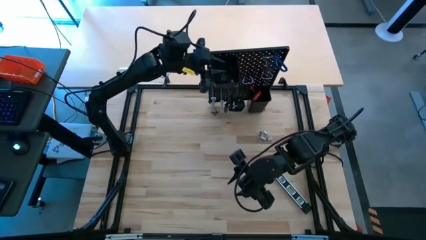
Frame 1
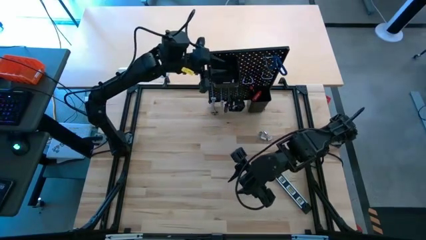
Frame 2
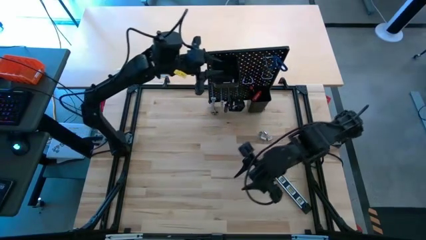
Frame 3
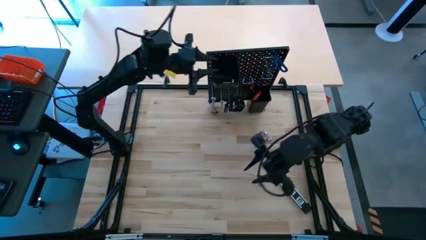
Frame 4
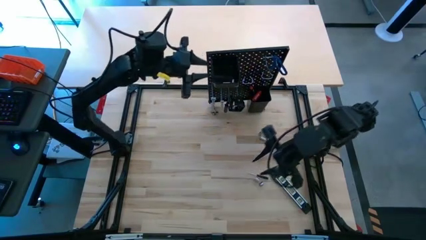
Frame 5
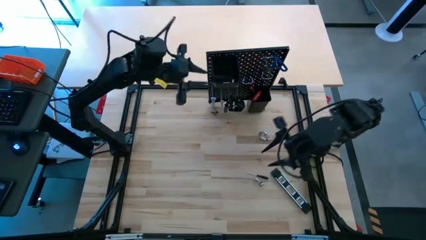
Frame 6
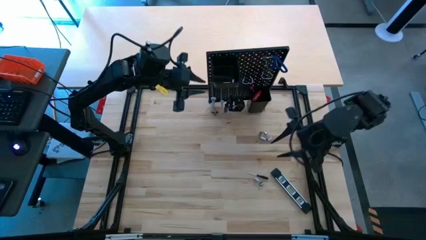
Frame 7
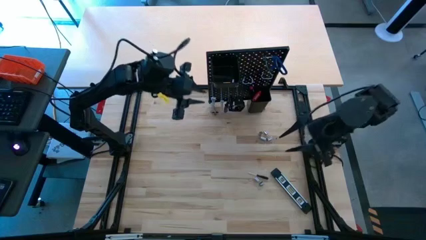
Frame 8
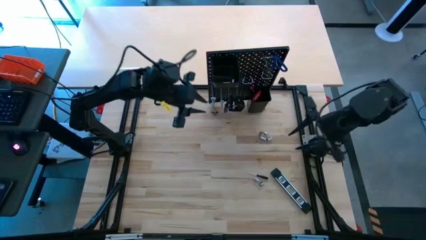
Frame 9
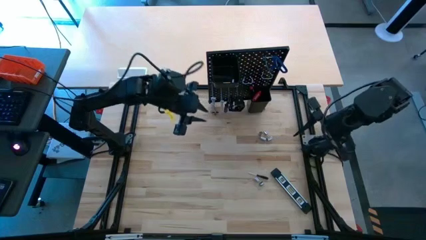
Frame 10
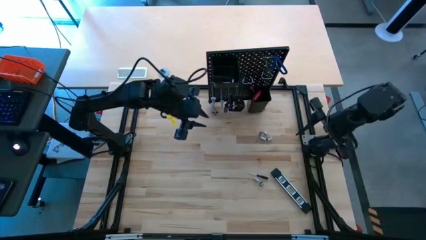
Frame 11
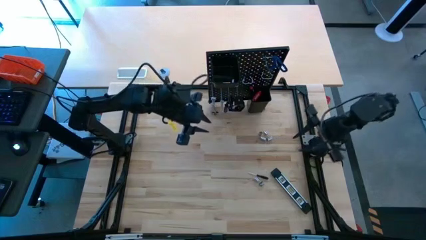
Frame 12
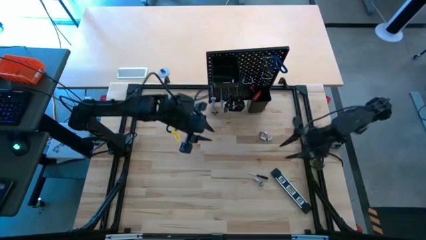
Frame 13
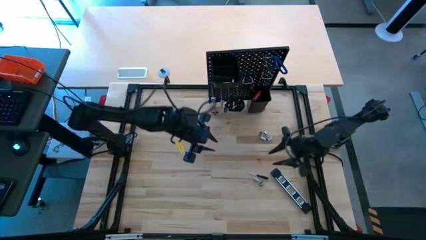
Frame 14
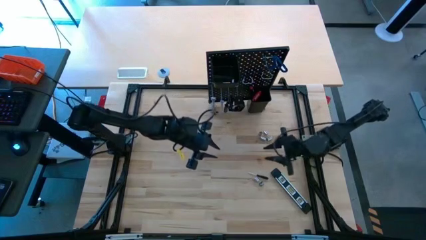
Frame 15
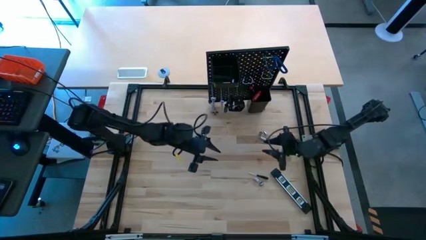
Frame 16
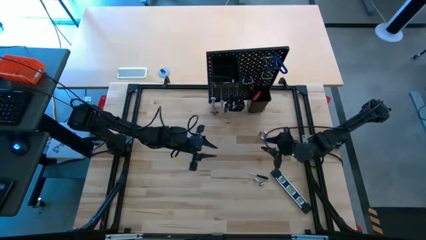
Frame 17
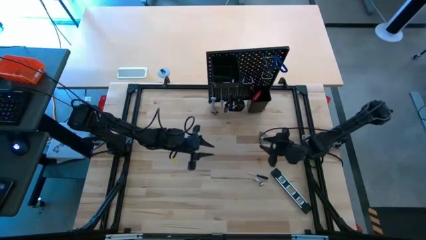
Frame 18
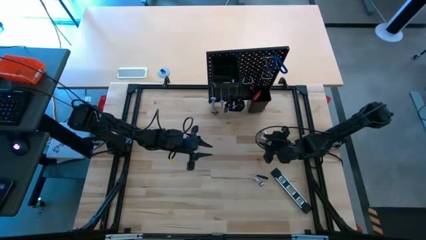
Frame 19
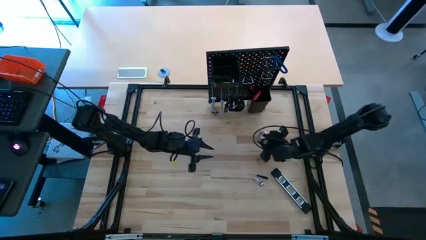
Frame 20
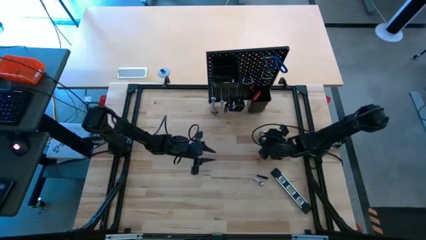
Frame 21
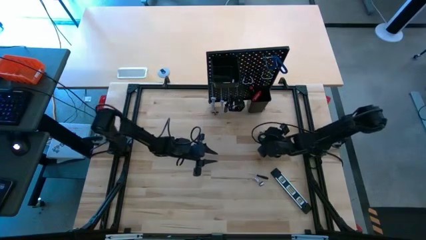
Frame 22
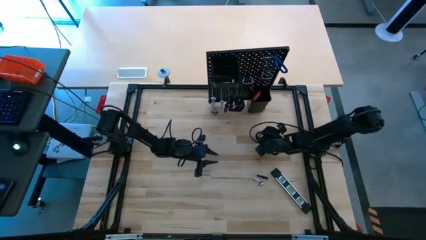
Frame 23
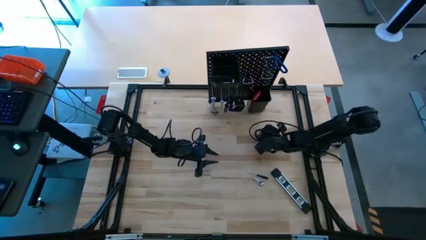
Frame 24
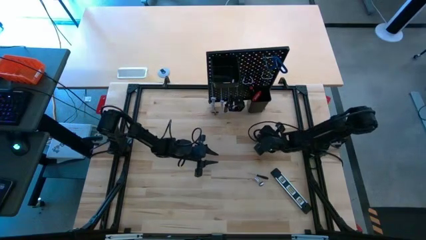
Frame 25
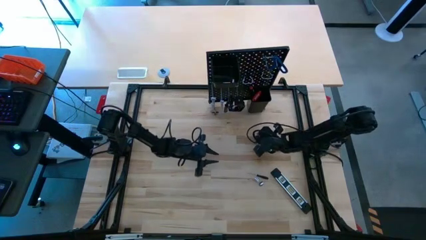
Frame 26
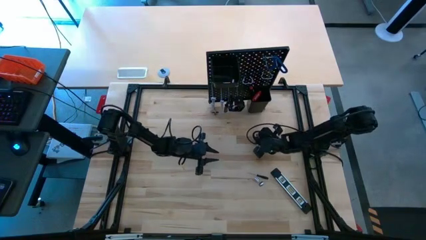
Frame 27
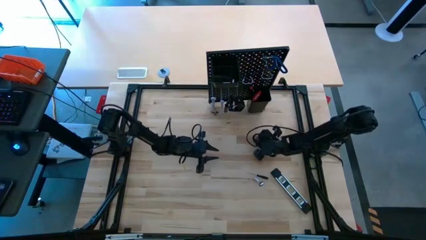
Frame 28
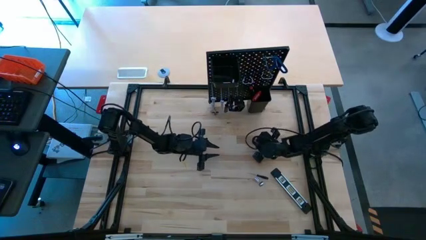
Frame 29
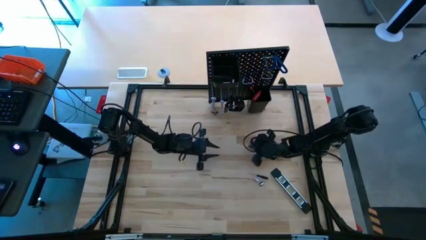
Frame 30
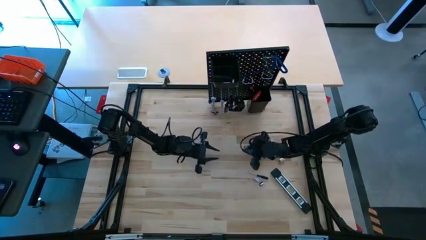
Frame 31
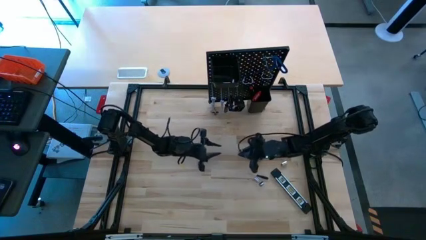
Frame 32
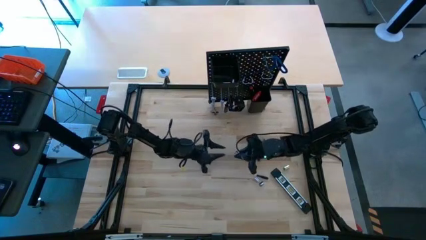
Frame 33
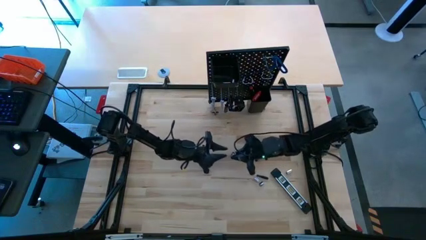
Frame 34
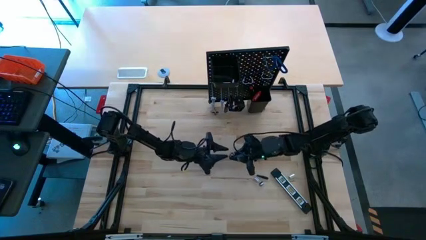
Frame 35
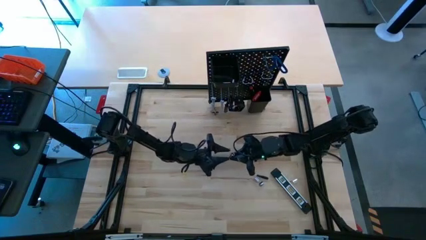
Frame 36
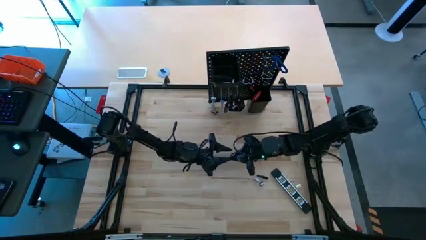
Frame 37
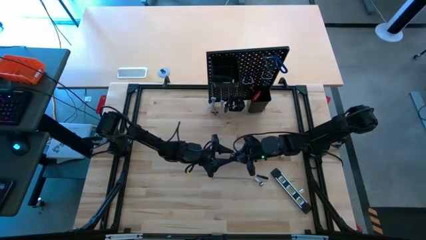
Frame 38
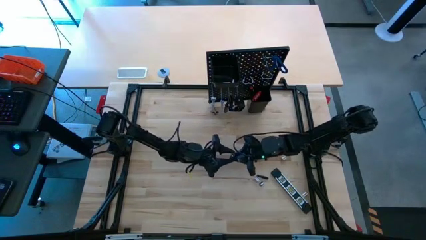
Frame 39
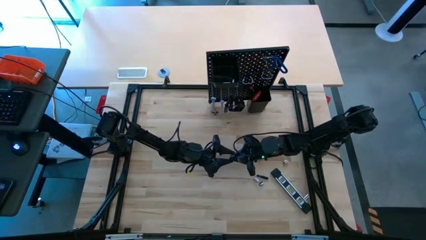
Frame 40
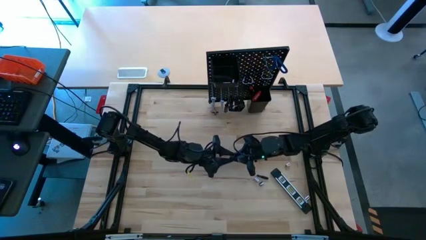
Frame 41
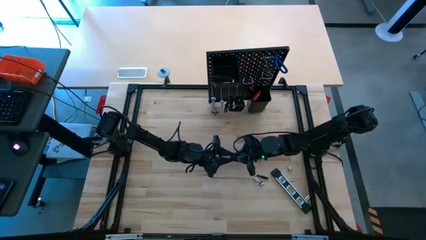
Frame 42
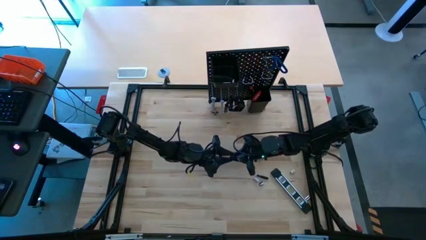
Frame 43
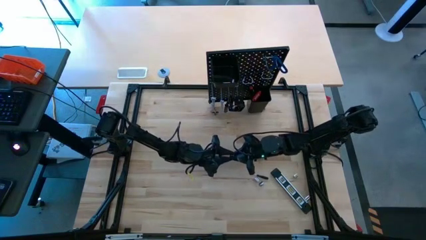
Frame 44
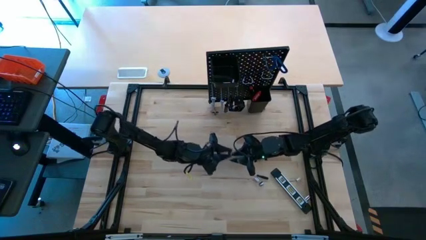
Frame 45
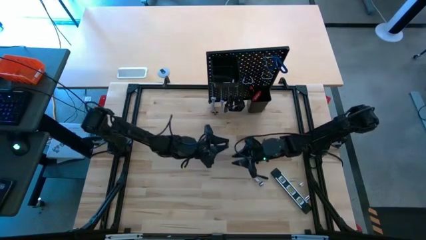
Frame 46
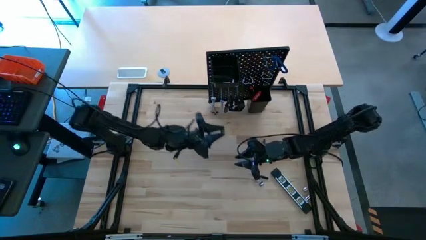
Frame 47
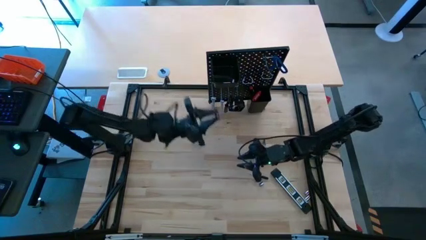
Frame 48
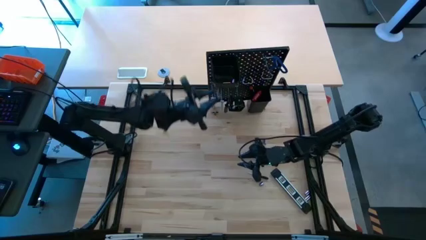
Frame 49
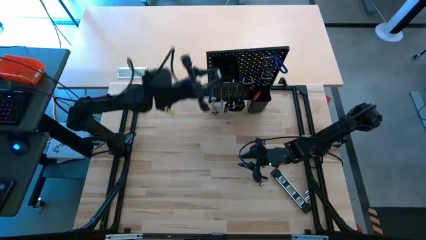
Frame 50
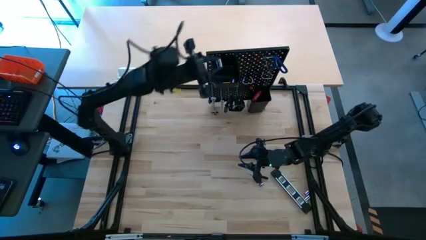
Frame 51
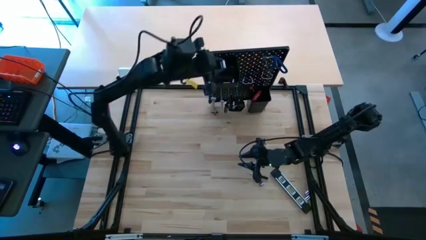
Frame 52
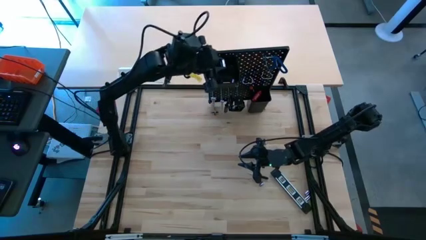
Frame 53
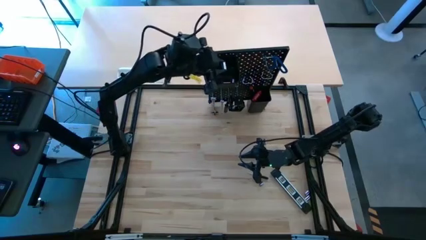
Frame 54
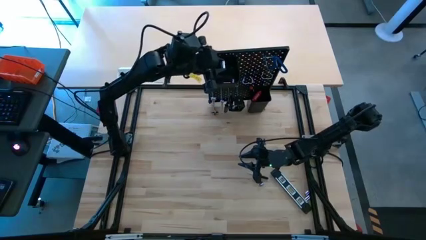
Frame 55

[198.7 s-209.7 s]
Task: Hang tools onto peg board
Put the silver socket into the top black bin on the peg board

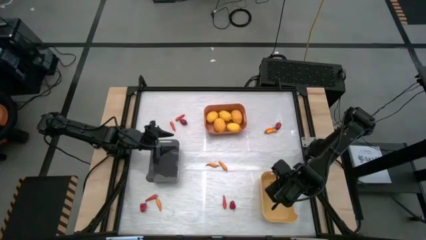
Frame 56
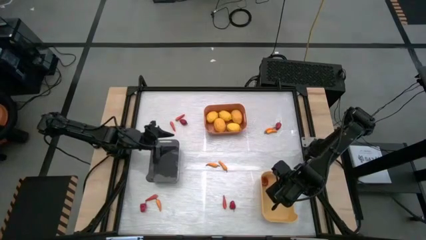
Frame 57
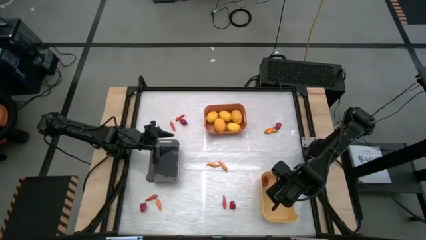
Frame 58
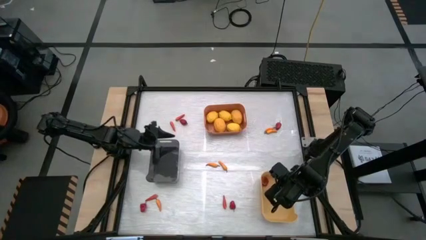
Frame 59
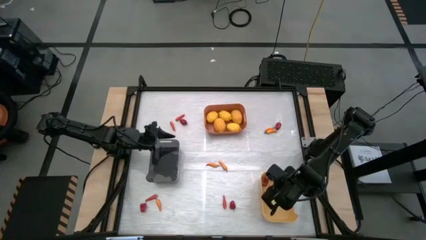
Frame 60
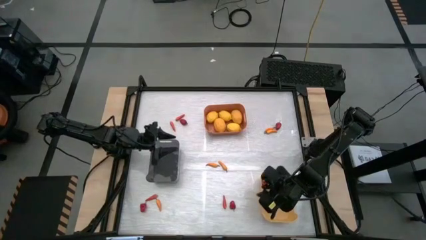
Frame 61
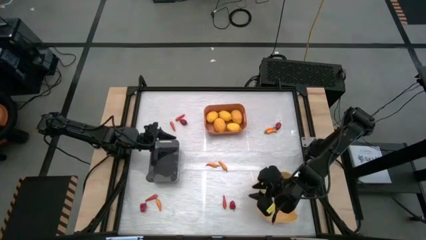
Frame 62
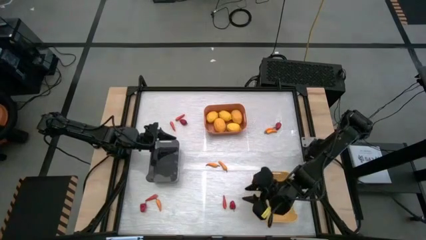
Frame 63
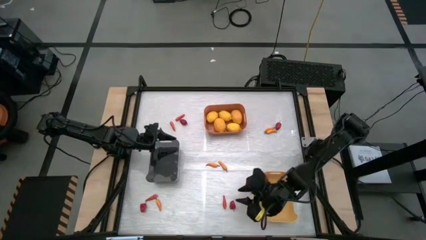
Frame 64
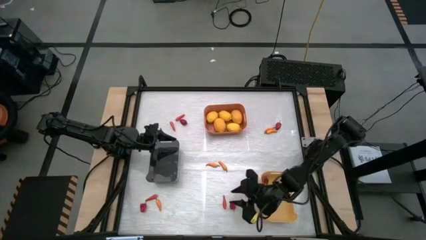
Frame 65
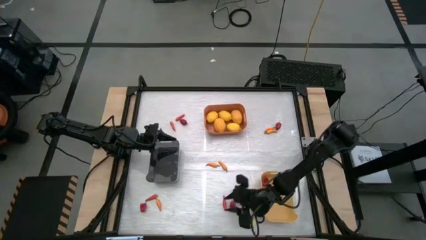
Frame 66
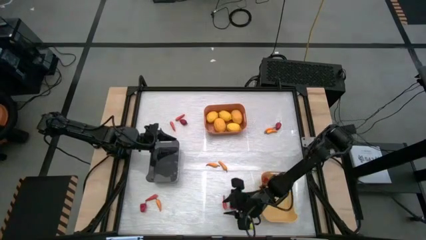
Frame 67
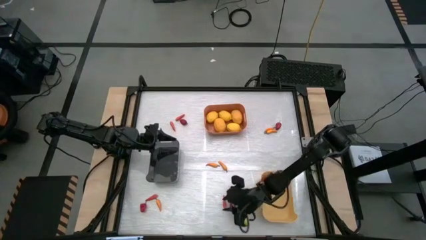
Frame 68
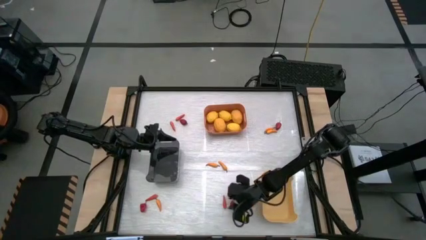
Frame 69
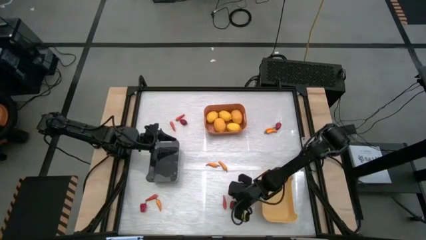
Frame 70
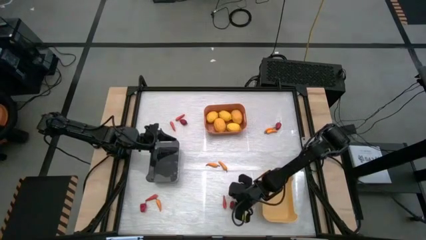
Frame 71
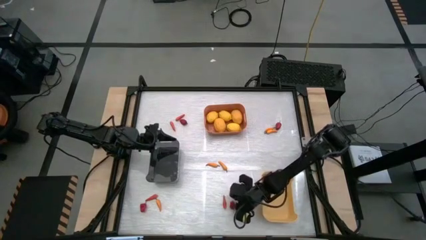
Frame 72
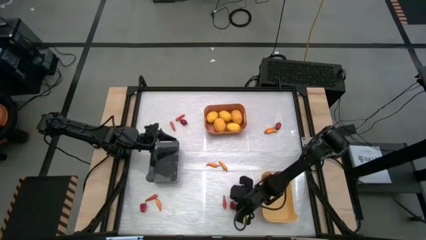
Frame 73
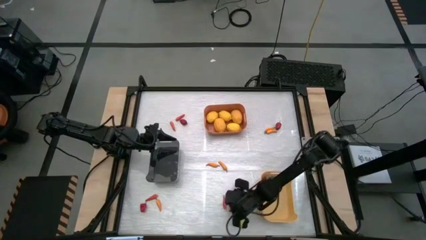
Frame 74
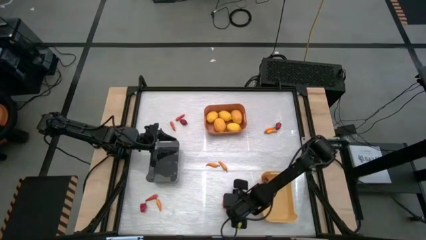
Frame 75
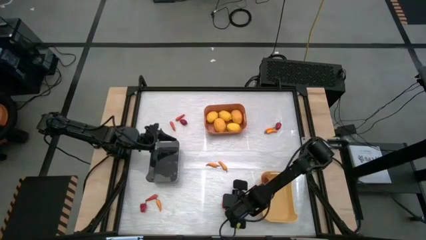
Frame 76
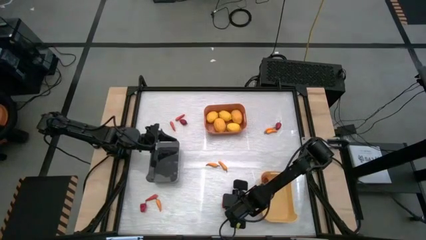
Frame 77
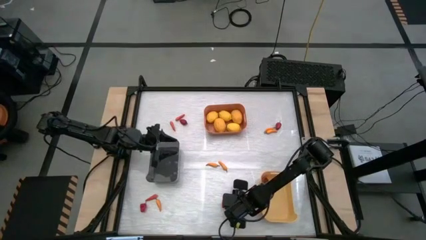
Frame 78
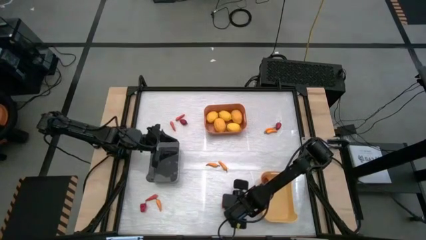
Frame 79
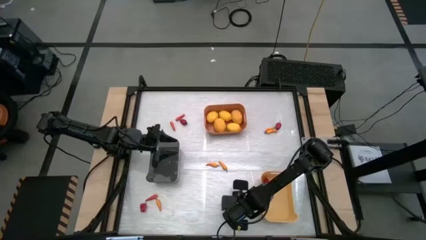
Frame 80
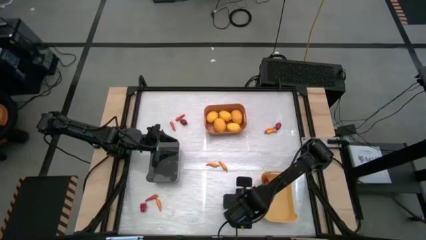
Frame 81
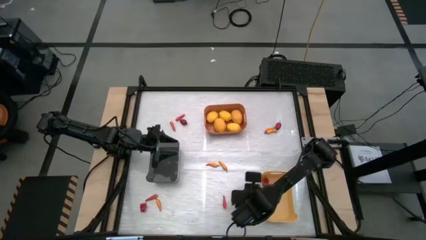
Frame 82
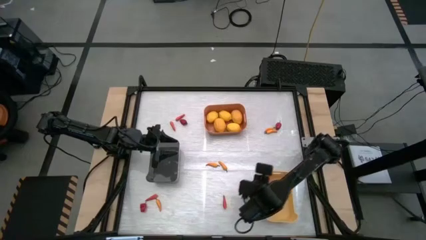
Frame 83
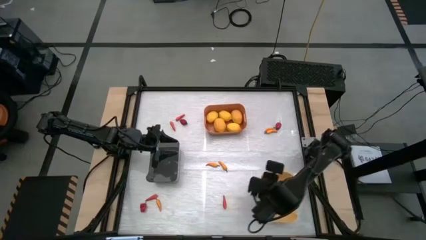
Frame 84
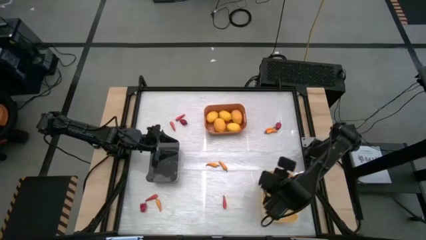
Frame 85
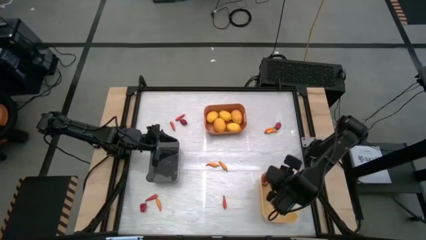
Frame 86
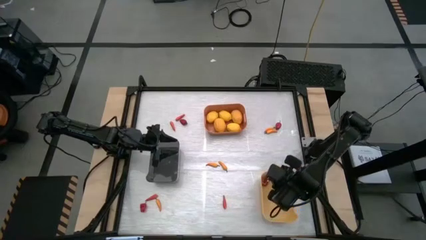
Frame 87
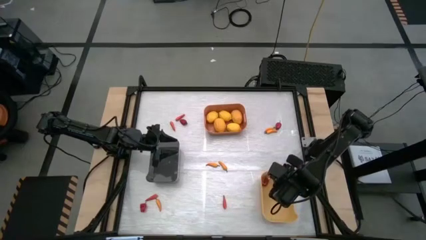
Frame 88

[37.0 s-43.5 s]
Task: Sort produce into baskets
Put the red chili pepper into the yellow bin
